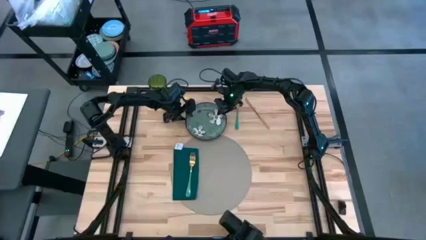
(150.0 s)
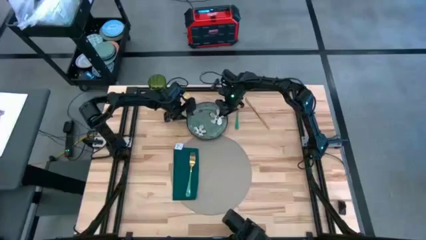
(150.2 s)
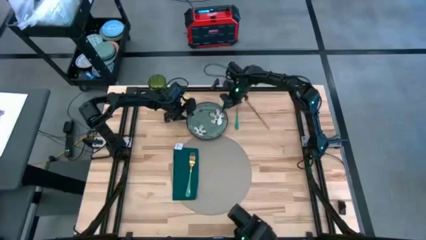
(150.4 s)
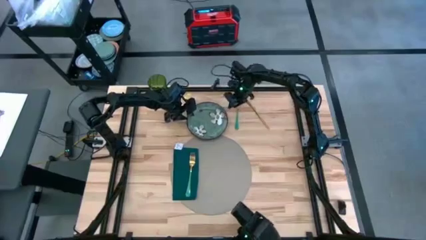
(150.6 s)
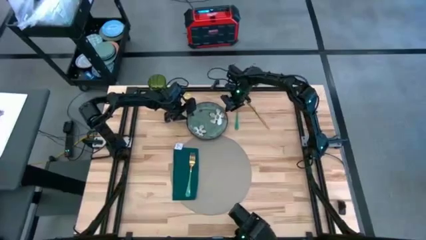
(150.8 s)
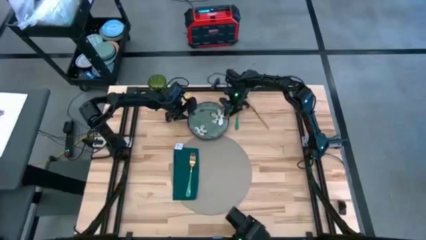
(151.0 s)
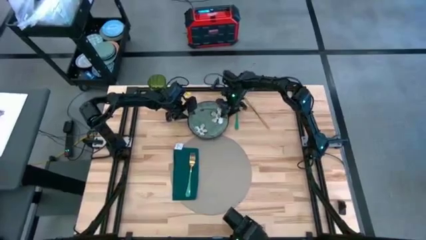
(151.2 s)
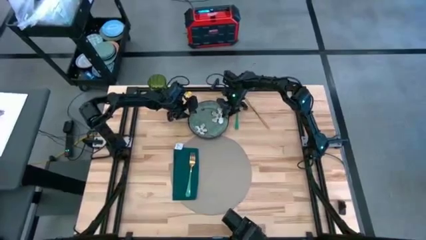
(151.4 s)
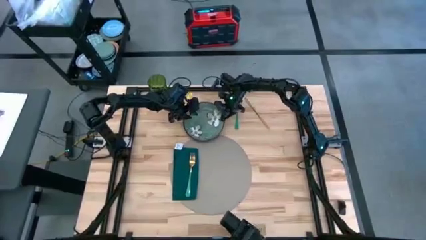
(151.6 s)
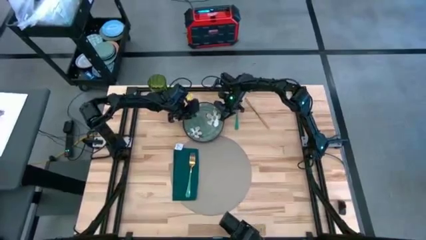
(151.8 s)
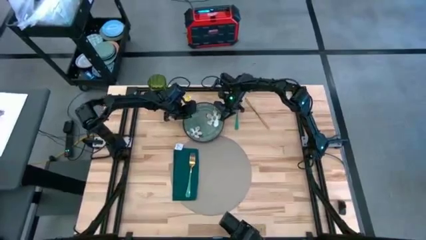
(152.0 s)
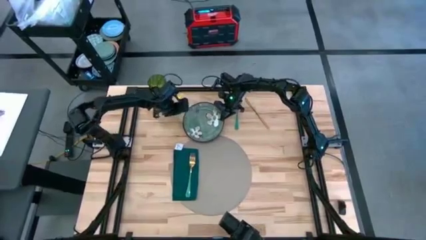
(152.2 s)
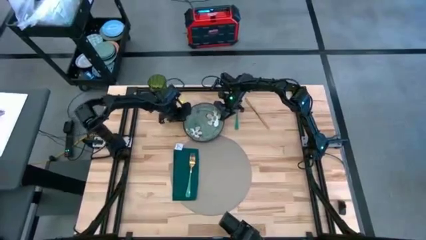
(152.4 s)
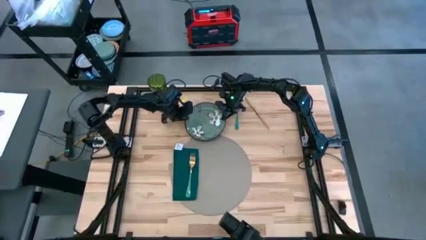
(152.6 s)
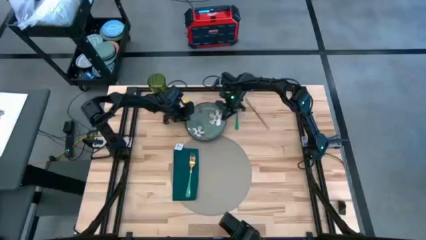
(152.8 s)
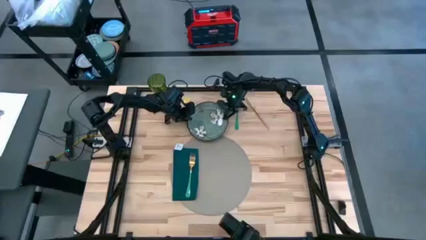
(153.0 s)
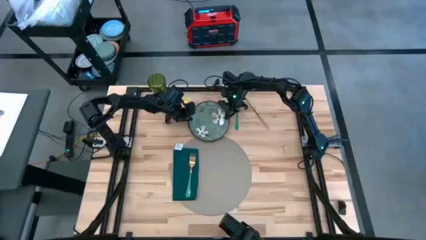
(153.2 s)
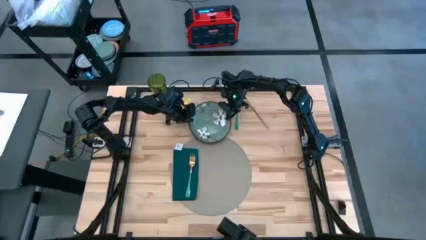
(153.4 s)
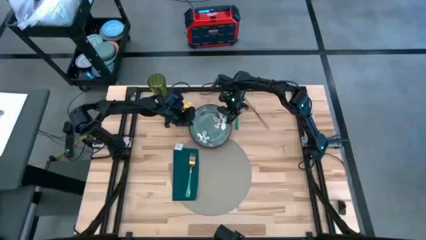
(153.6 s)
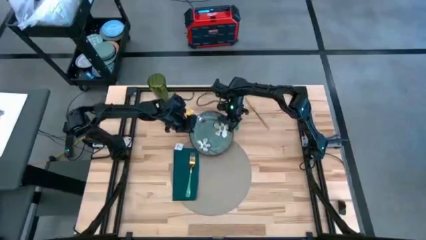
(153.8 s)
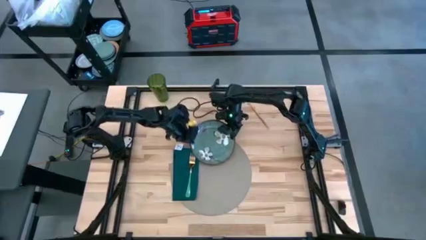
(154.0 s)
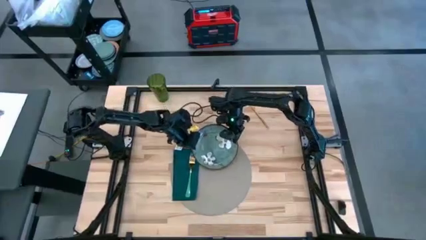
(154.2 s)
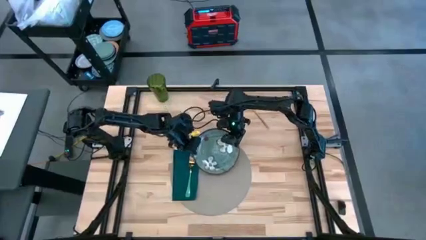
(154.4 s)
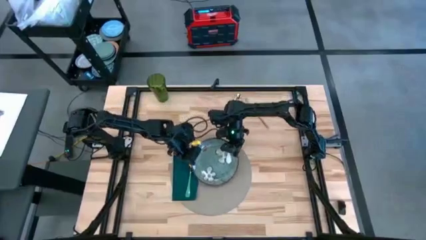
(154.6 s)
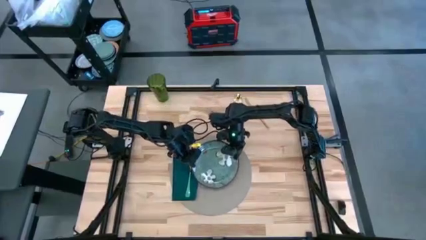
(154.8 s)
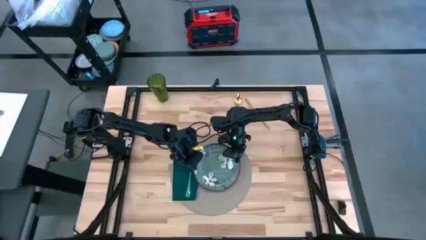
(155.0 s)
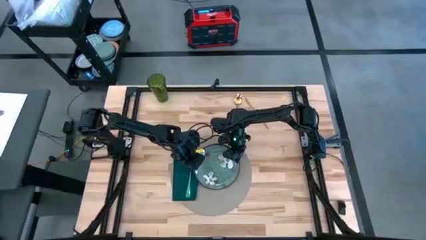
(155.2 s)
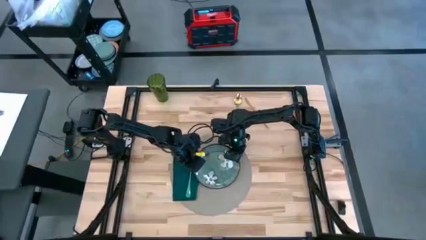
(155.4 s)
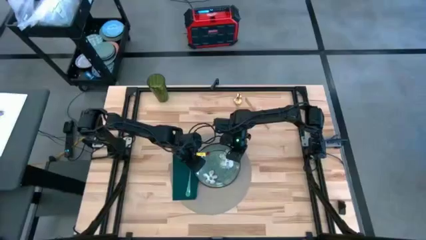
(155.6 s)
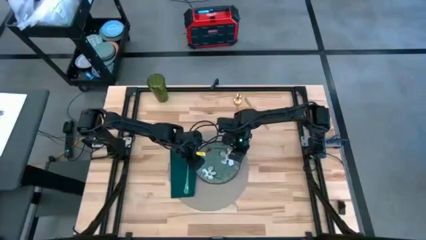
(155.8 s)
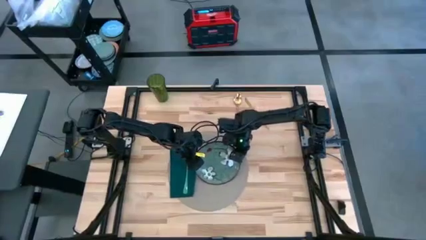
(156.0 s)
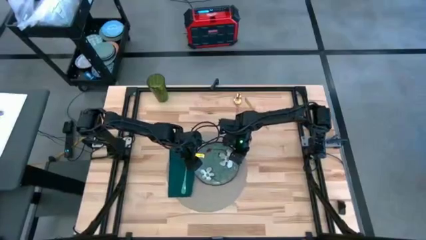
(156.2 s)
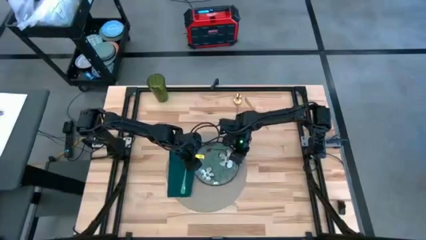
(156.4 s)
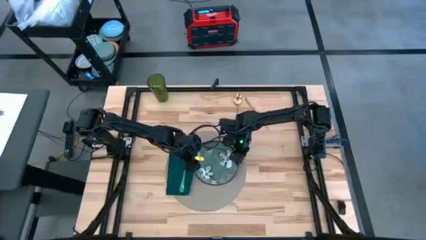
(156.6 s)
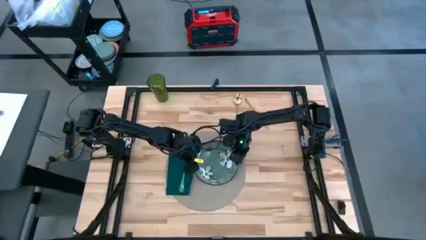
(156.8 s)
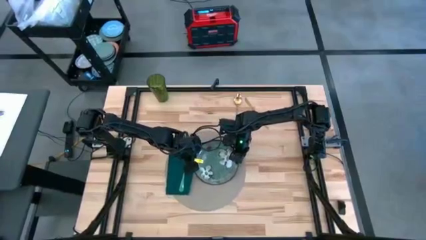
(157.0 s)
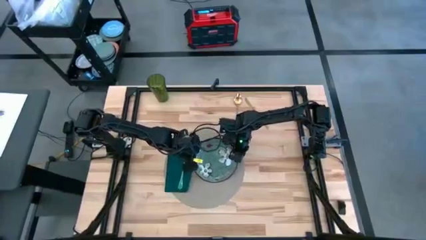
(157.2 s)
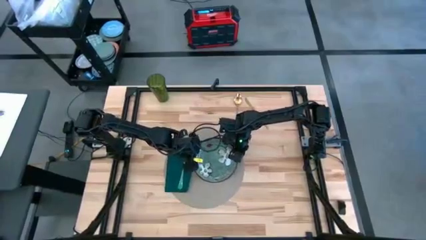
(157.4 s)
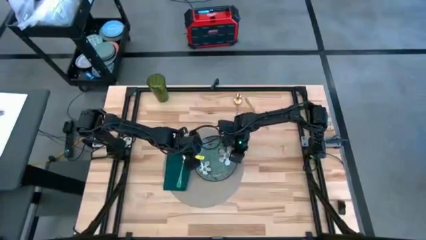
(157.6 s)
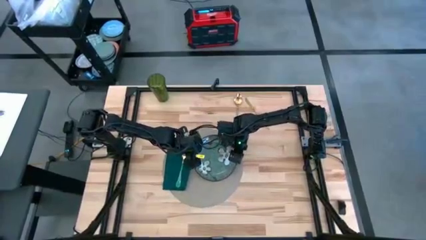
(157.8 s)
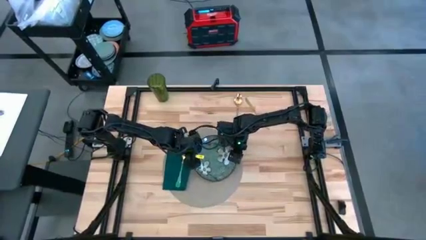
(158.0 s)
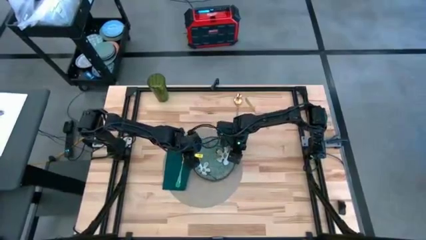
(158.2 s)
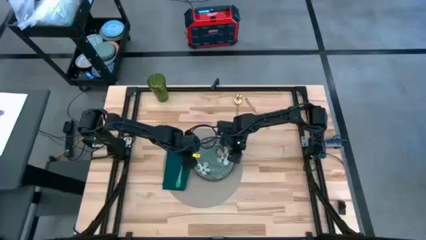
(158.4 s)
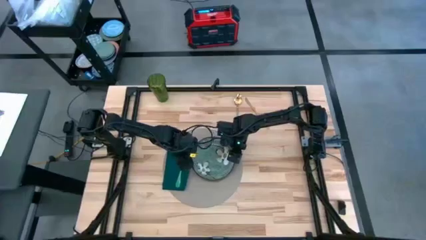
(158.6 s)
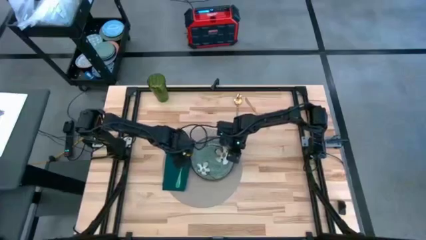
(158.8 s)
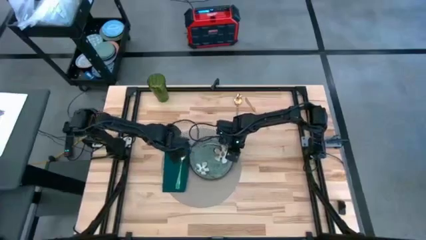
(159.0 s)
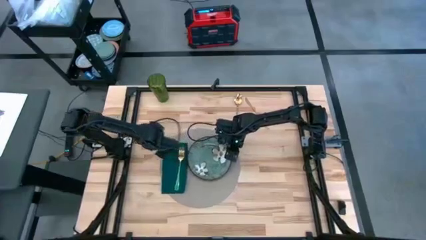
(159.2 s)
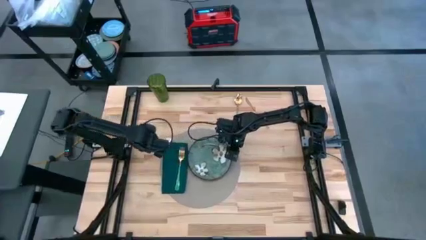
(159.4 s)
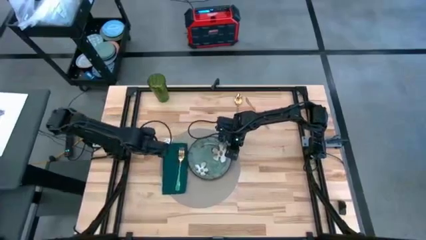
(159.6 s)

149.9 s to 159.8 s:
Task: Set table place
Put the green plate on the gray table mat

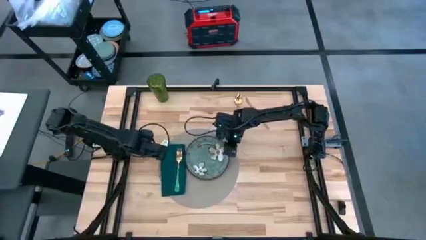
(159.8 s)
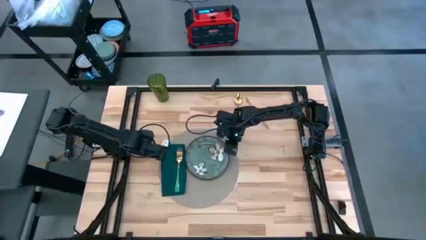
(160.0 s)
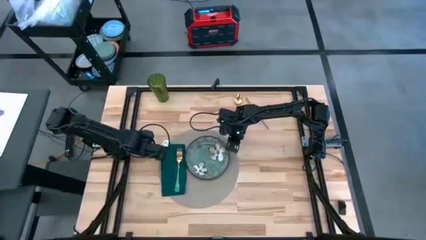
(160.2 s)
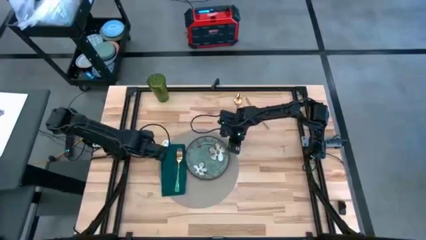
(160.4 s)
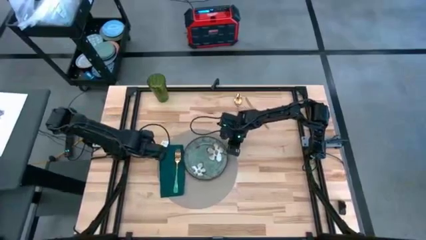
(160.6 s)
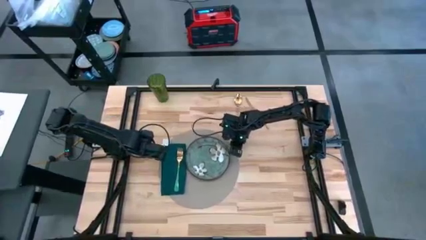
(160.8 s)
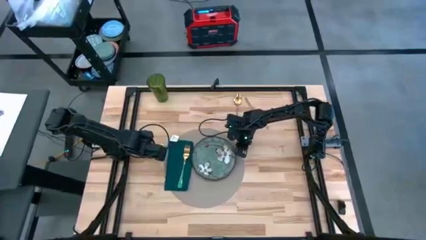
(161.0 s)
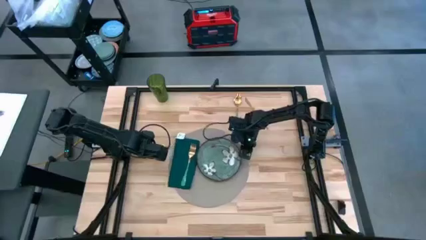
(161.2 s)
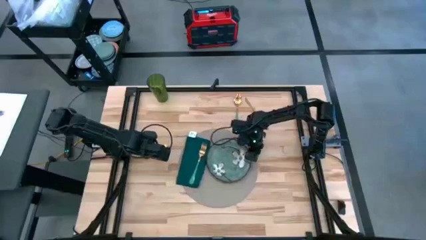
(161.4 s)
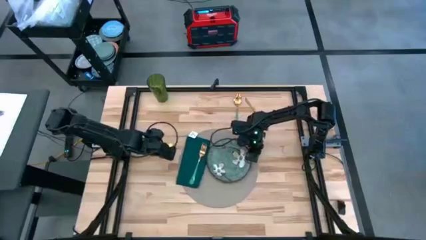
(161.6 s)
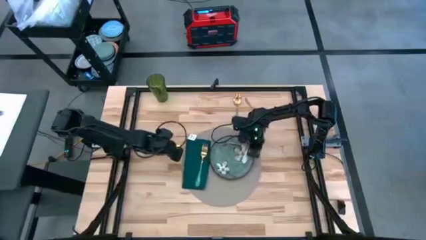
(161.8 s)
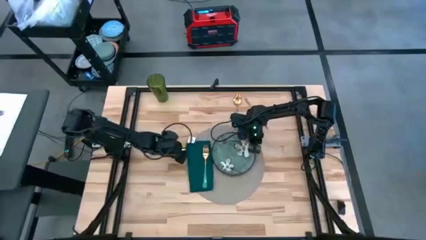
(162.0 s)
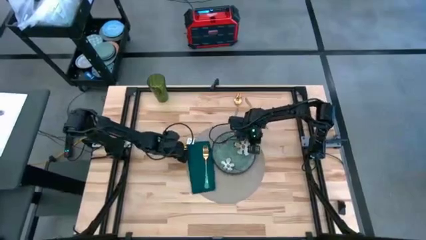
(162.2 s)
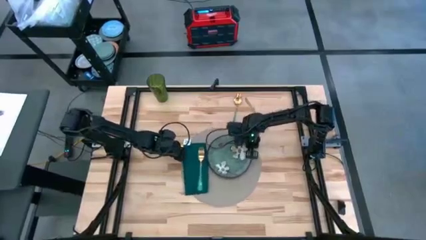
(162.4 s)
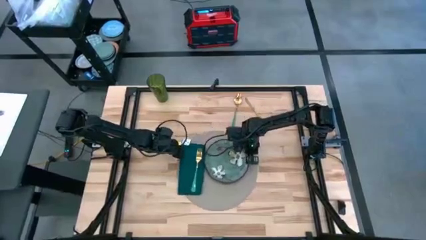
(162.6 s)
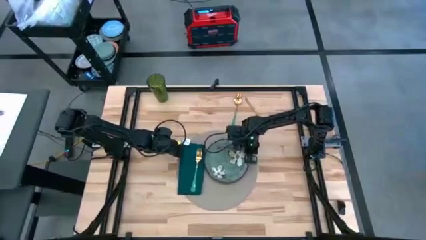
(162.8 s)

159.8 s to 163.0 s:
Move the gray table mat to the center of the table

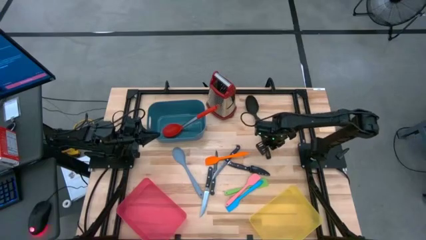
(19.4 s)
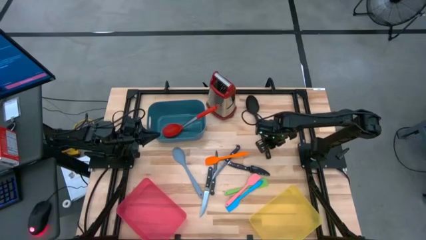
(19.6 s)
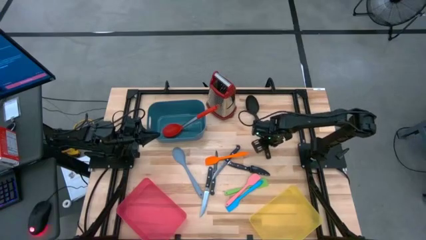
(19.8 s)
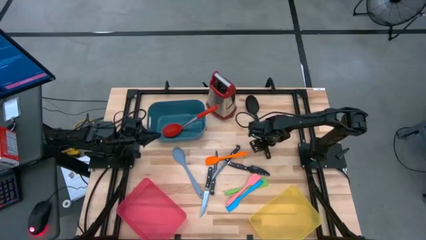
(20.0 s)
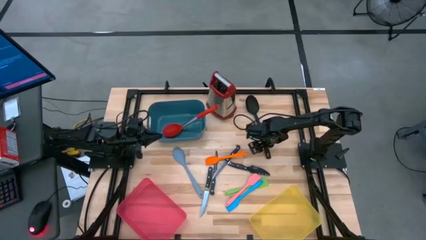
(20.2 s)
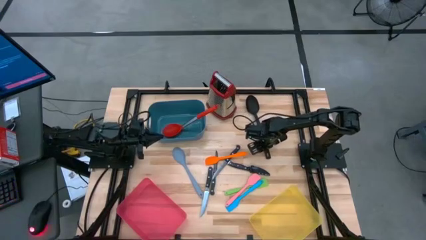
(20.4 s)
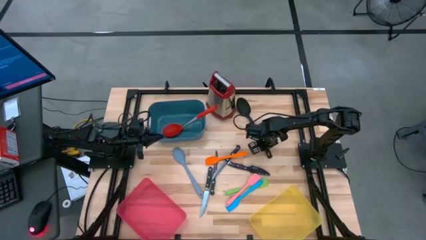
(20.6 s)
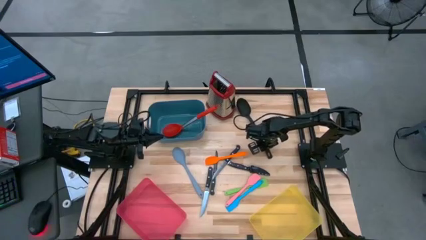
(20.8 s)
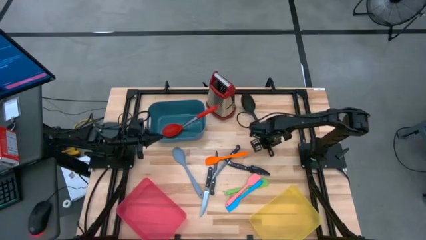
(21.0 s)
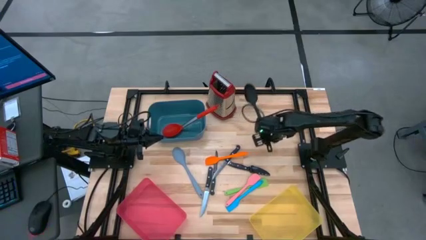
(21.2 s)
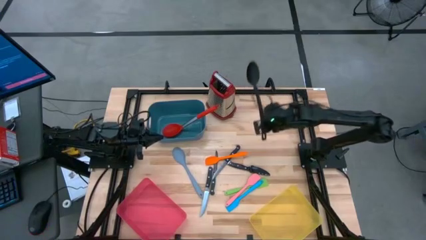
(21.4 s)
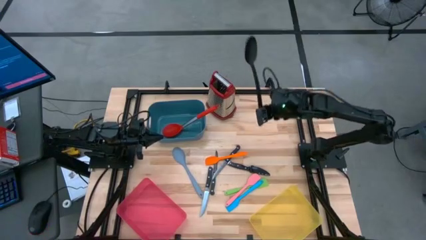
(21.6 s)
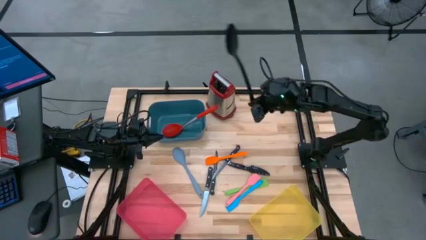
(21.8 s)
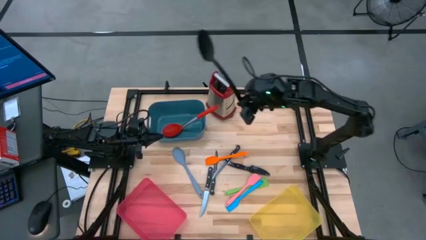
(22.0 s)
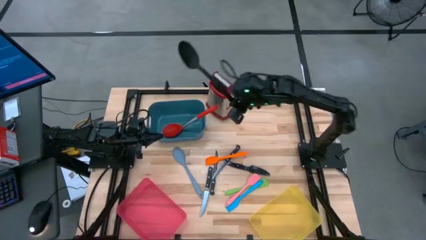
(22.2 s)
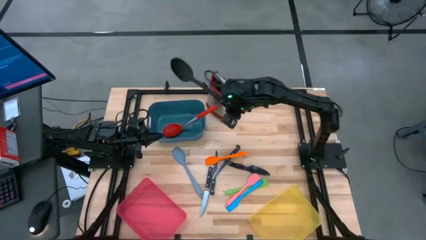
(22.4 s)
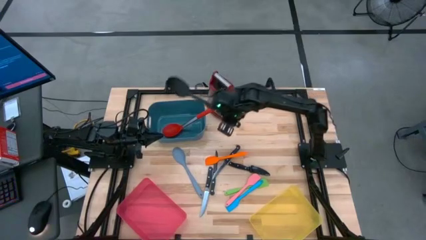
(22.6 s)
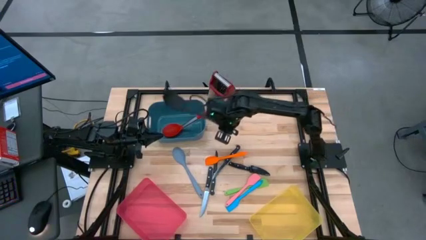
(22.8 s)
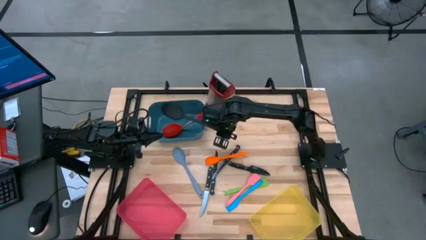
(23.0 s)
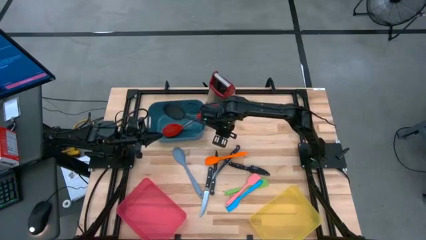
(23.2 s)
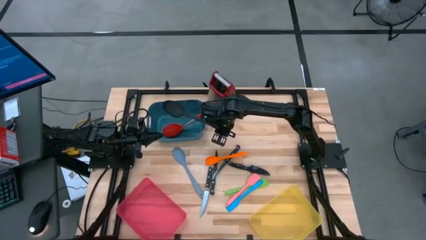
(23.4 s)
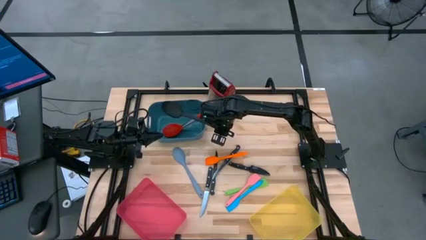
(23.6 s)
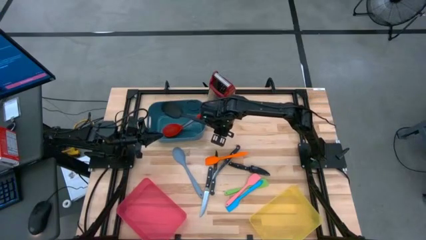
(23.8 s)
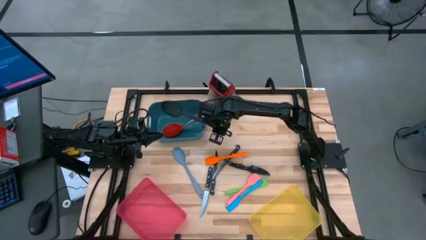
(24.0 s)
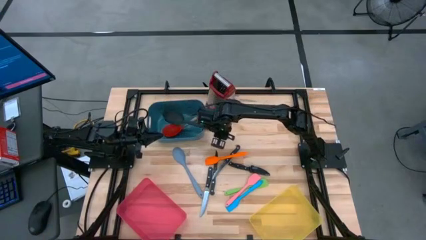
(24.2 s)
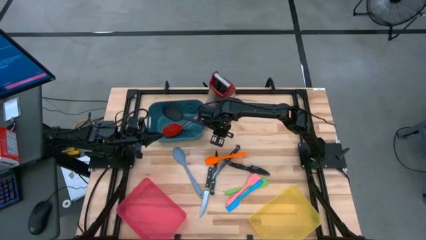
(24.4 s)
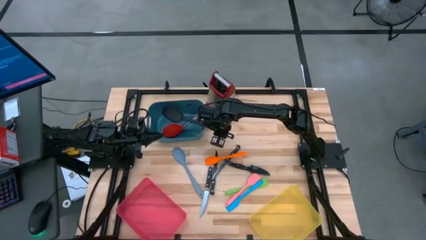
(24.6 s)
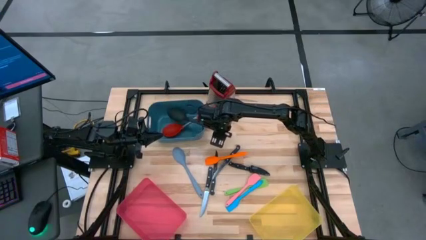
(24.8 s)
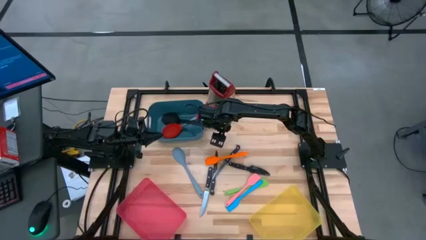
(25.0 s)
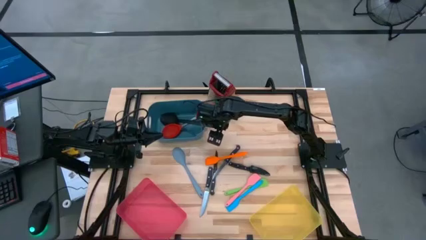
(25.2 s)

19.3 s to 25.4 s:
Task: Pick & Place Kitchen Items
Put the black serving spoon into the blue bin
